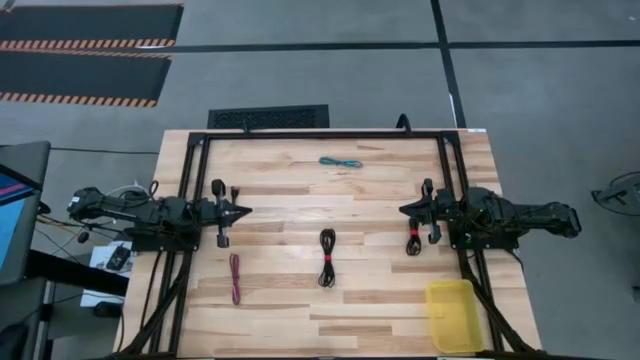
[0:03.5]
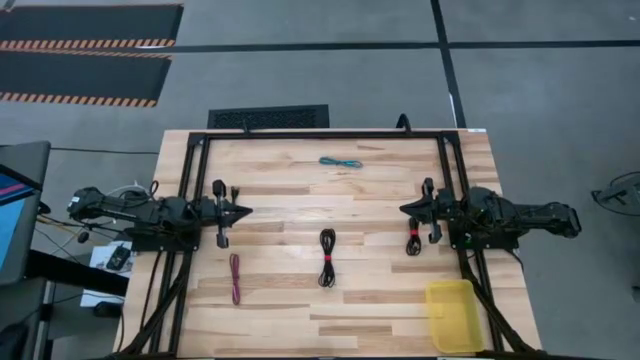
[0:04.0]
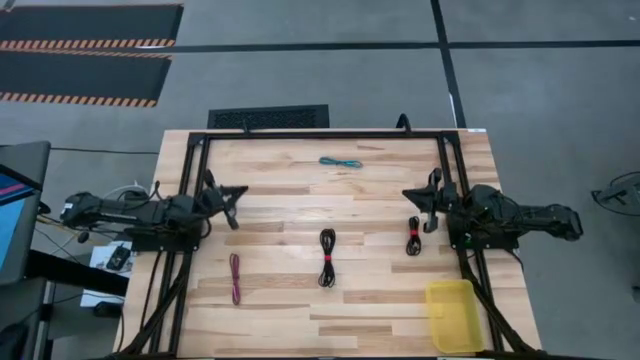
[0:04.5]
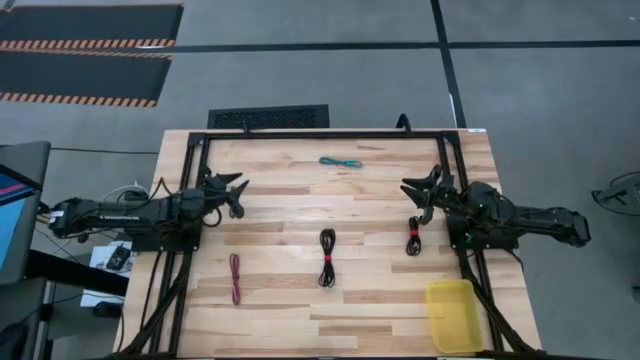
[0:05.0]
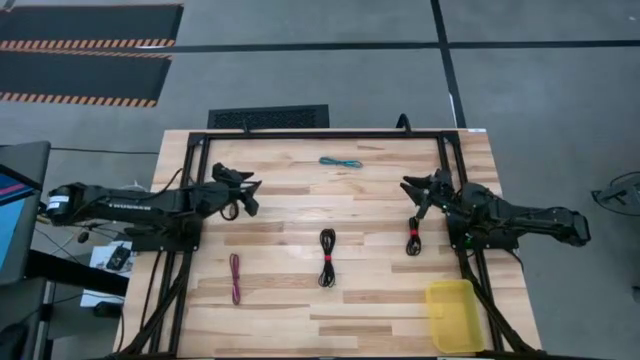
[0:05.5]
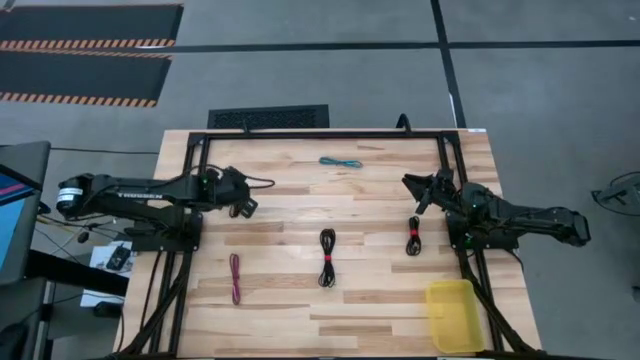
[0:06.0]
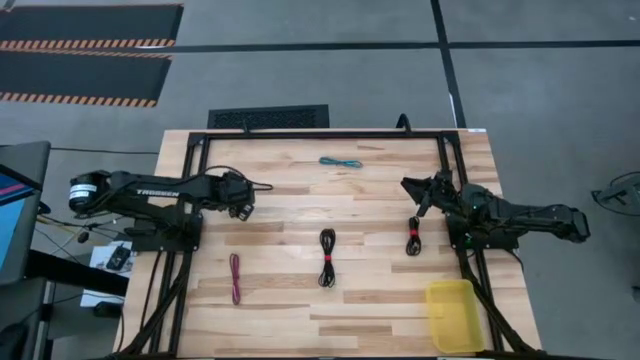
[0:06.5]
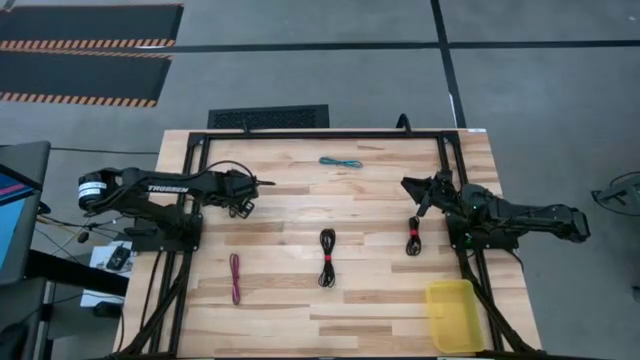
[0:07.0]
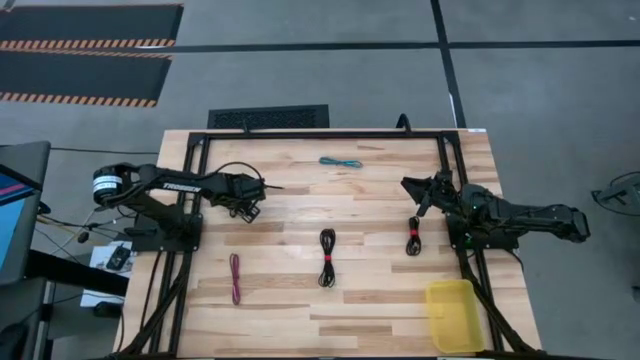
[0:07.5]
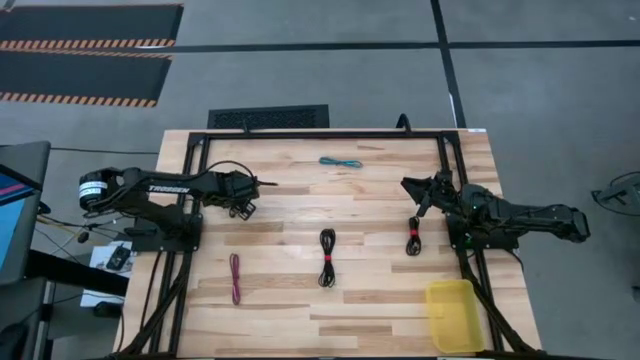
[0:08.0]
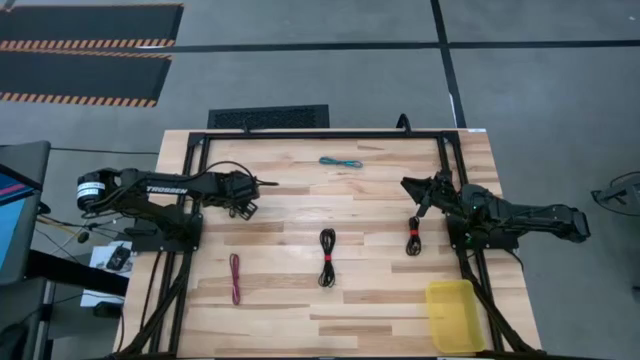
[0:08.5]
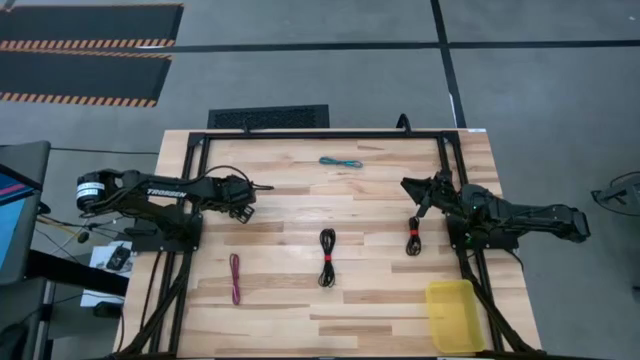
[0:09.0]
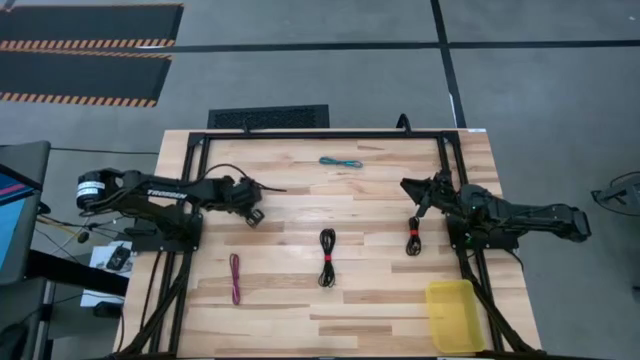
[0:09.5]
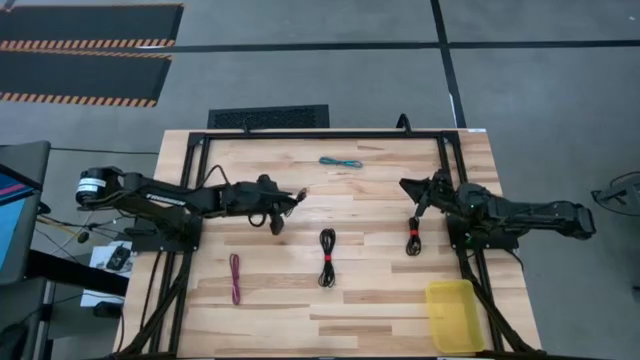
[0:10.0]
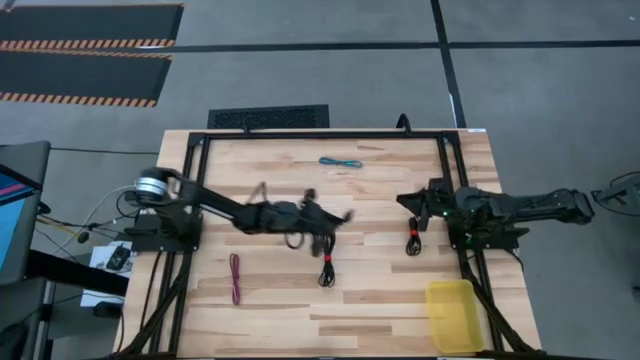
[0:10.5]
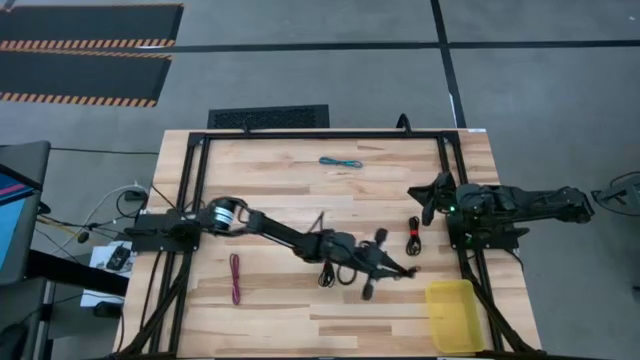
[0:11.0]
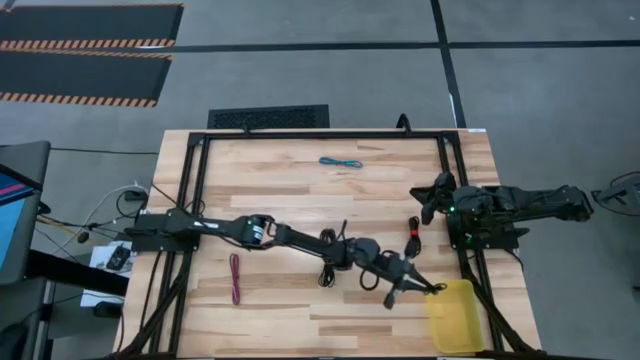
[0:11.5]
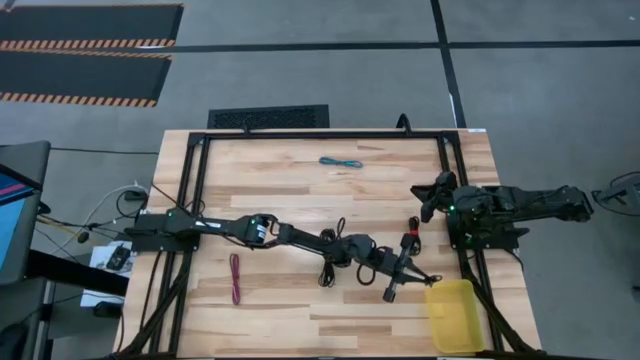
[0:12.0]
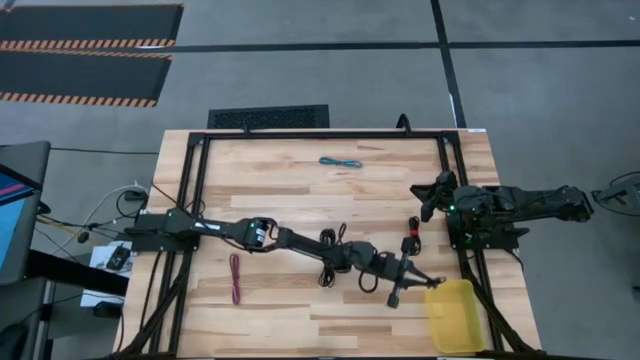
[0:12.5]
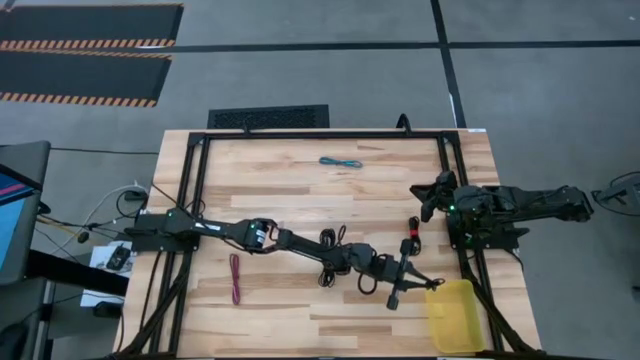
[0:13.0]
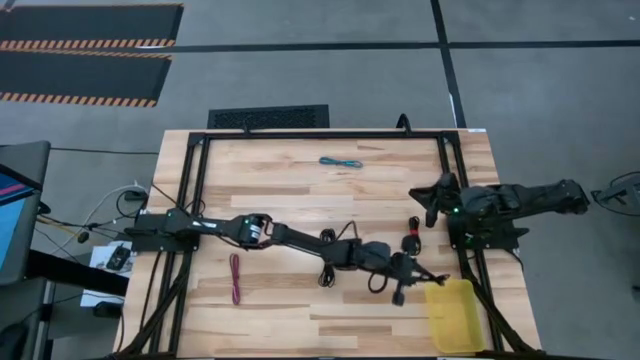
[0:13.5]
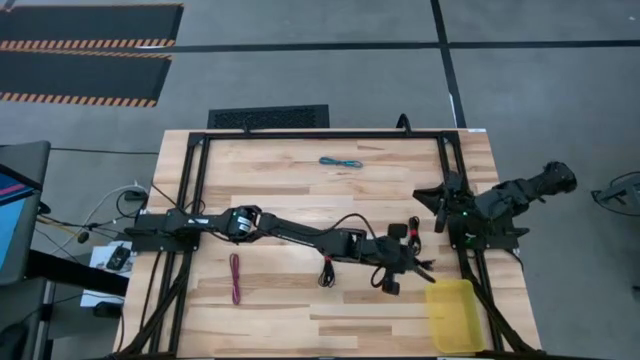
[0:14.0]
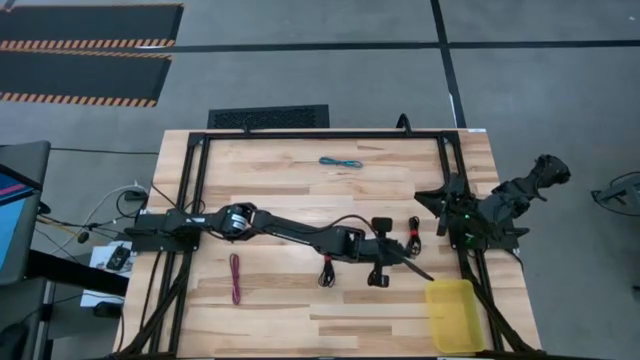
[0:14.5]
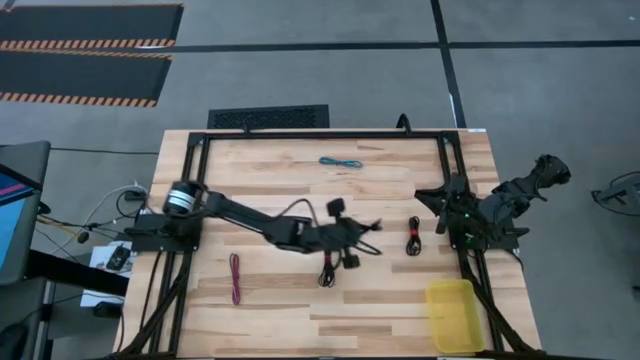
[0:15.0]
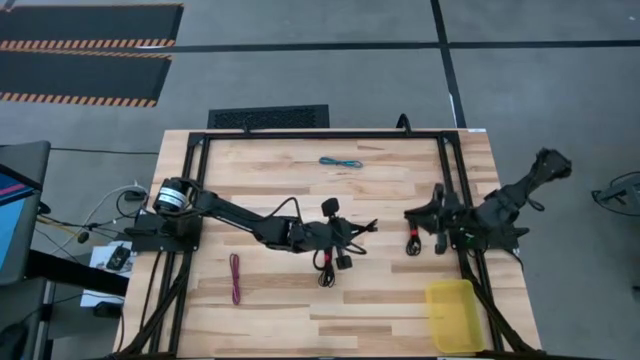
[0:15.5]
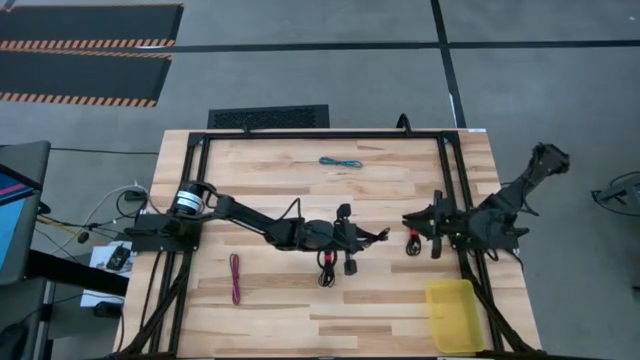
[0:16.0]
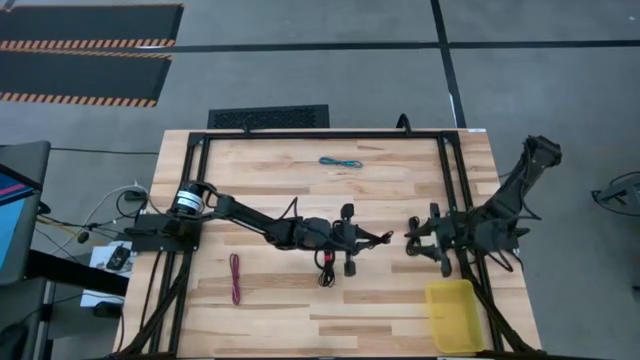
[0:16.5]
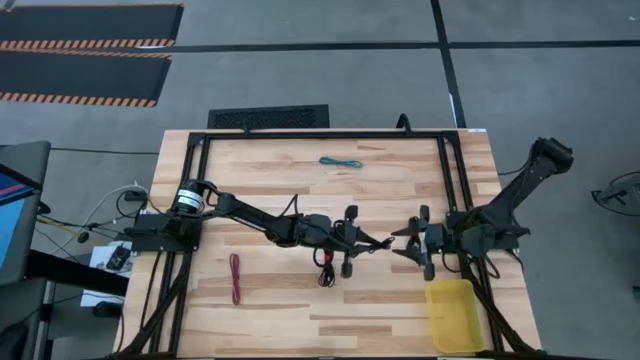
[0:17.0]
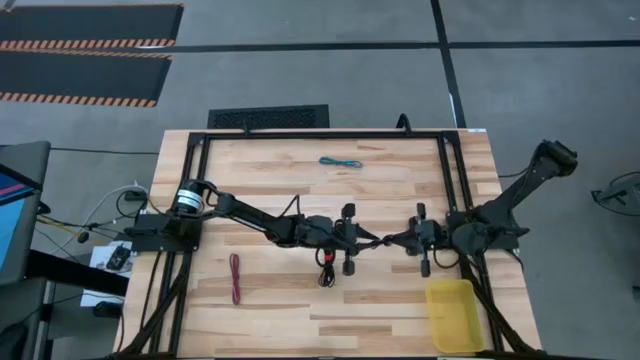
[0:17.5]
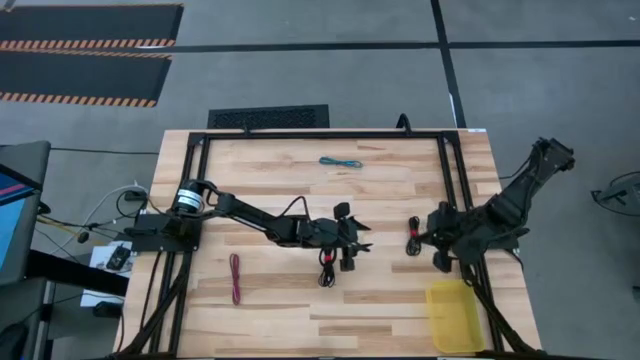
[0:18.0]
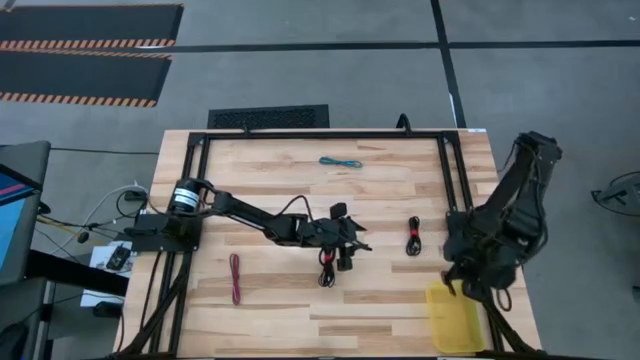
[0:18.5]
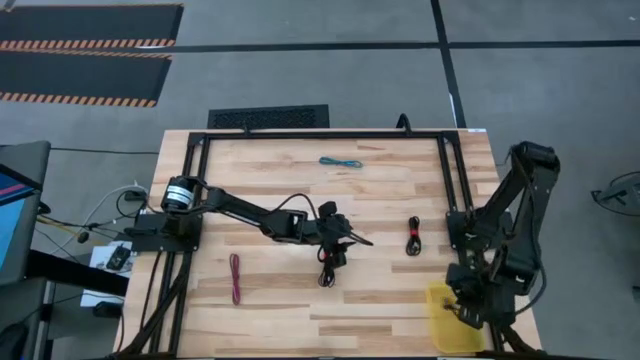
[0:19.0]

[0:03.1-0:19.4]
Task: Pick and place USB-C Cables
Put the left black charger cable into the yellow bin

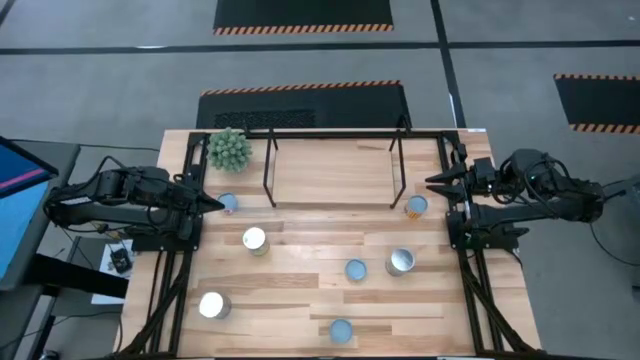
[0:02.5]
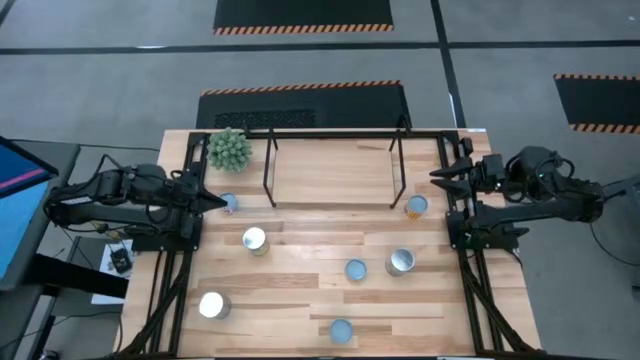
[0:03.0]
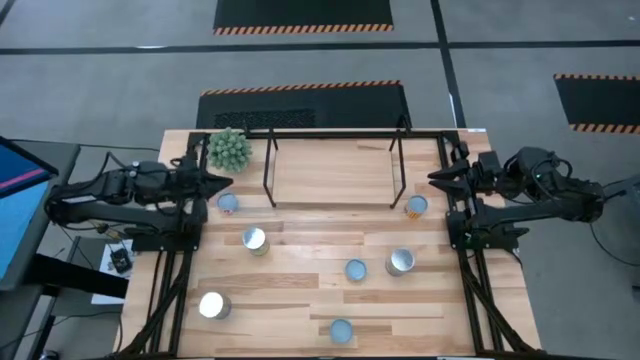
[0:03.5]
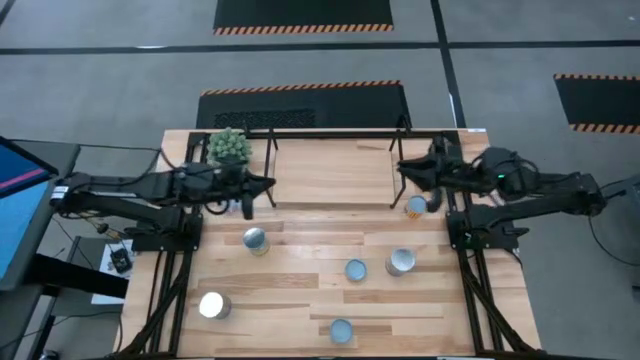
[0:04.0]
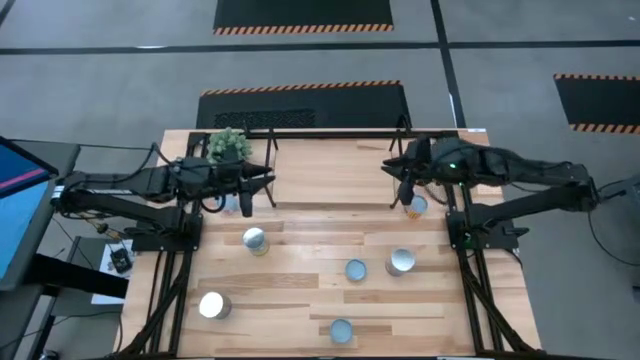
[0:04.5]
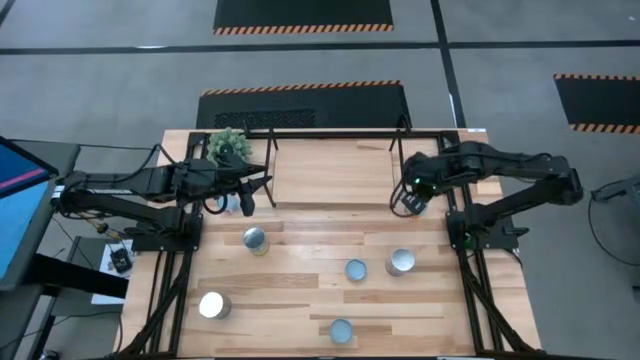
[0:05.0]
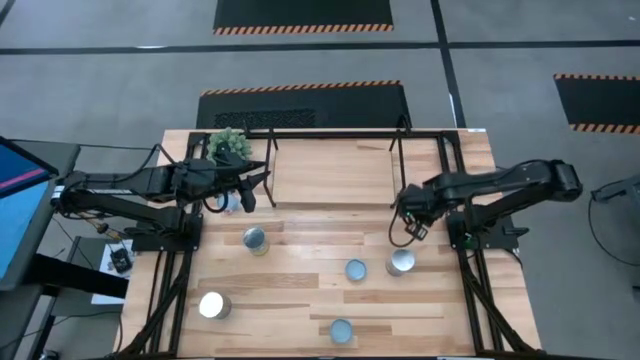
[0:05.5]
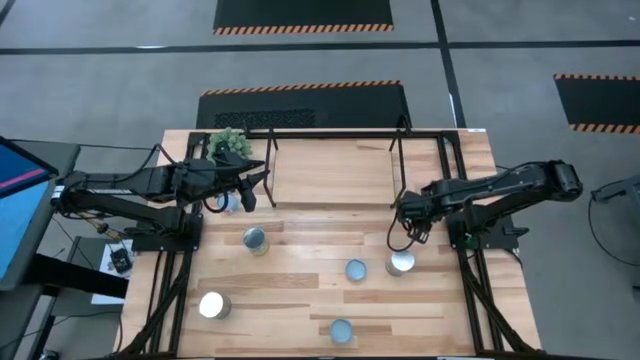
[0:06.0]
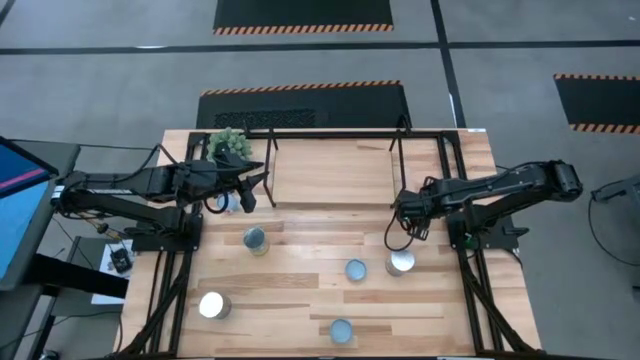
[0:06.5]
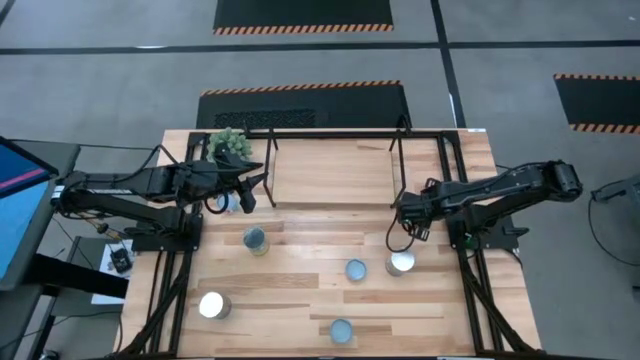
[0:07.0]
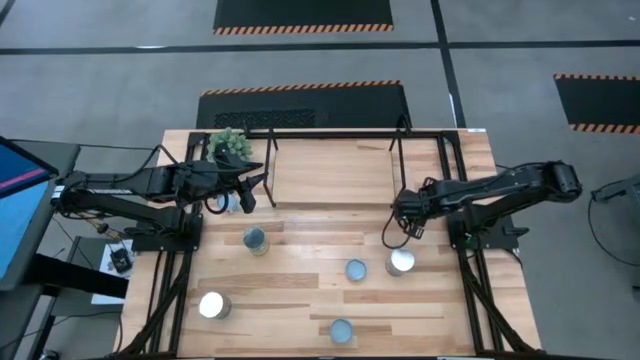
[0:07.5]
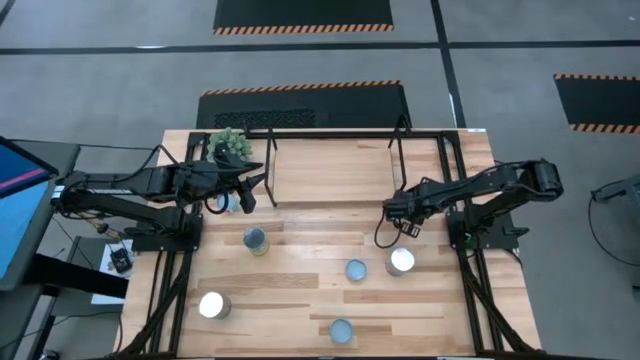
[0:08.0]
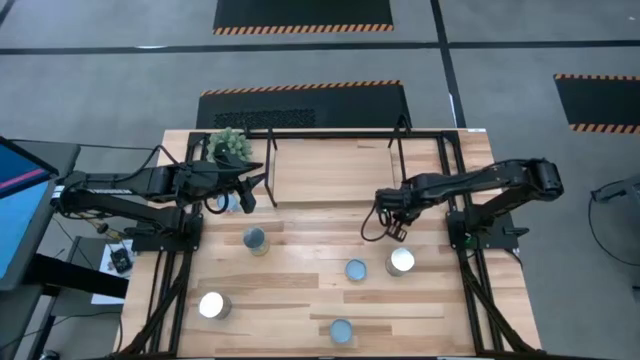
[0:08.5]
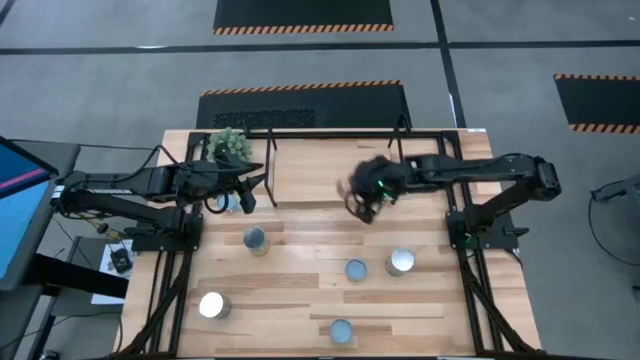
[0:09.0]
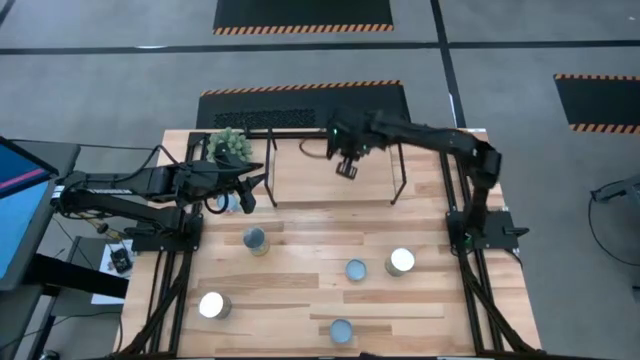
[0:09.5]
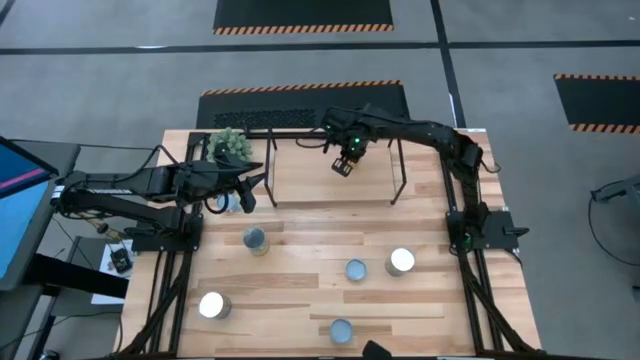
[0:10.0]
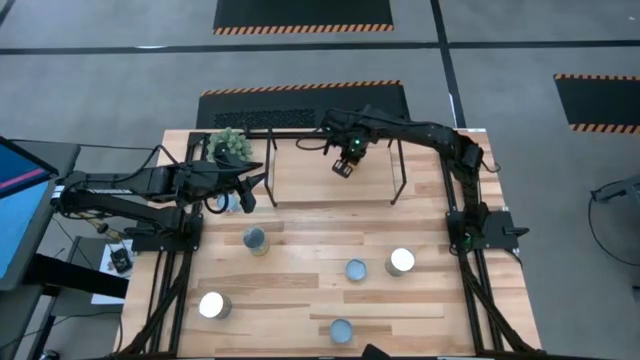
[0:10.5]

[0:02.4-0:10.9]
Task: Pick and place cans onto a shelf
Put the canned black beans on the shelf
